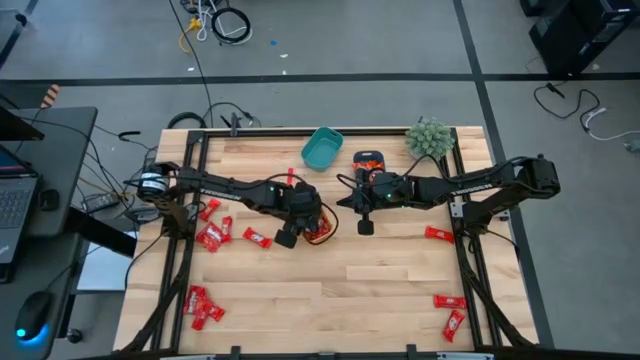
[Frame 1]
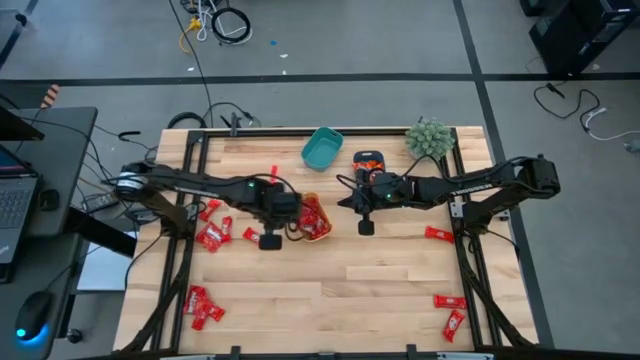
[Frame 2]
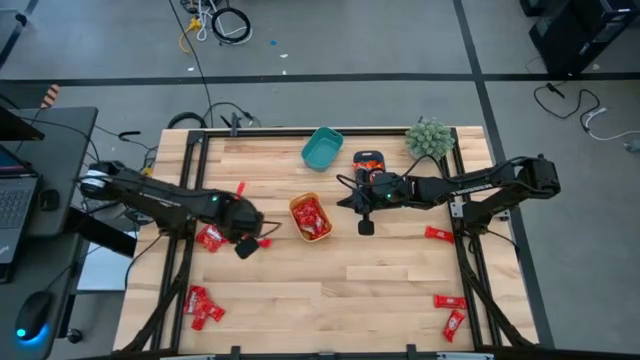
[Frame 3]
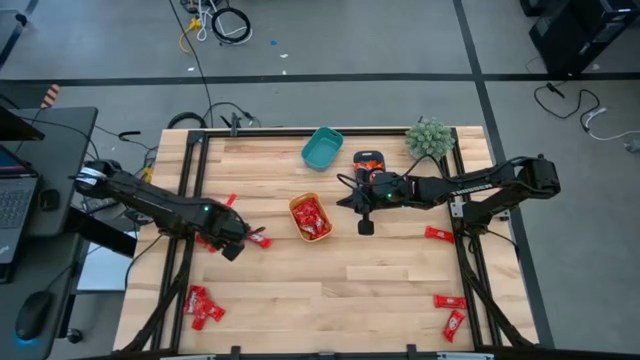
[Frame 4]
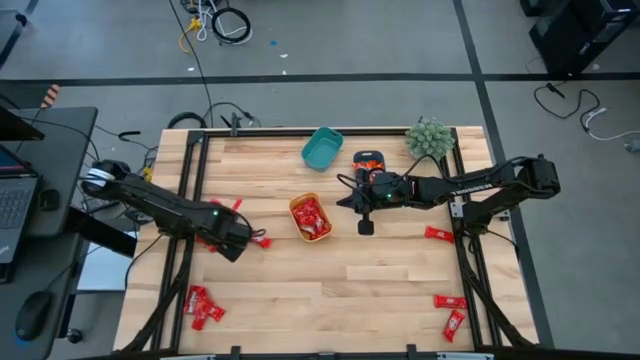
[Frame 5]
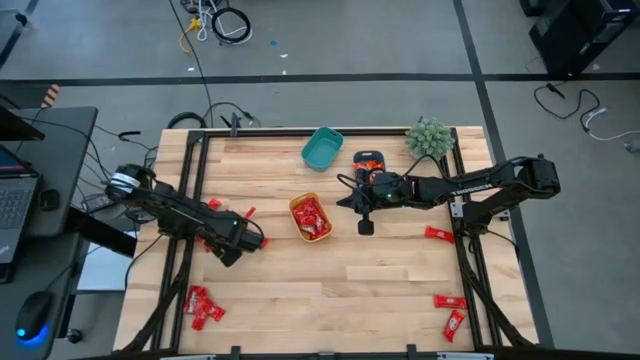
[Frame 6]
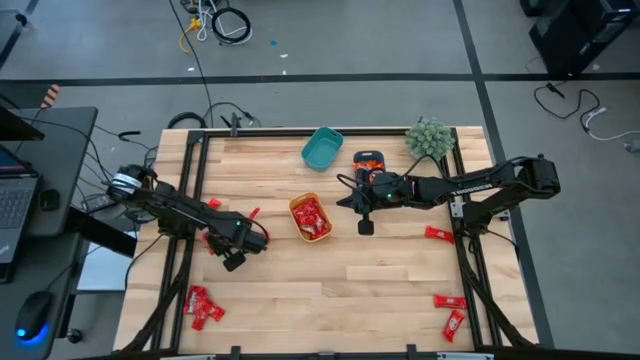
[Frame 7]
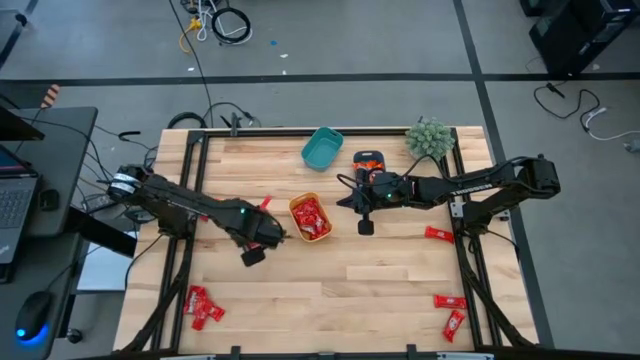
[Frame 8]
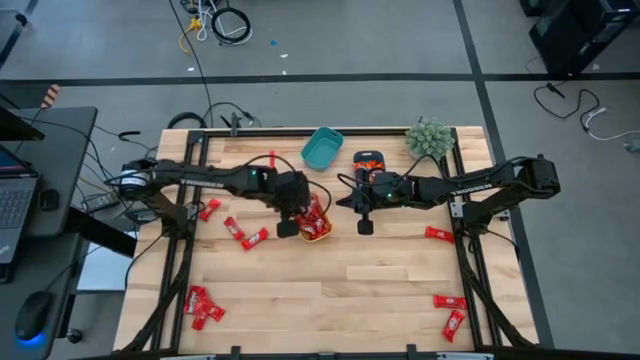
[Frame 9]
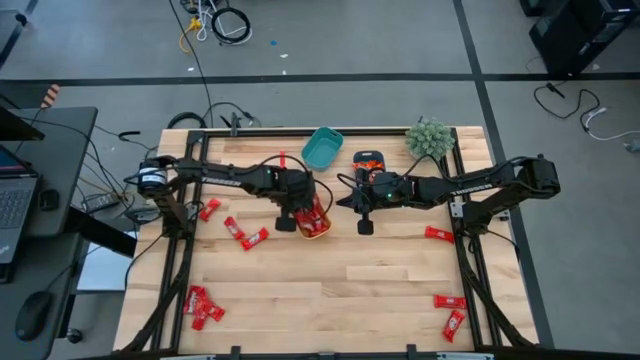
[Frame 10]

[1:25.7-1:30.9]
Task: Sort candy
Put the red candy into the yellow bin

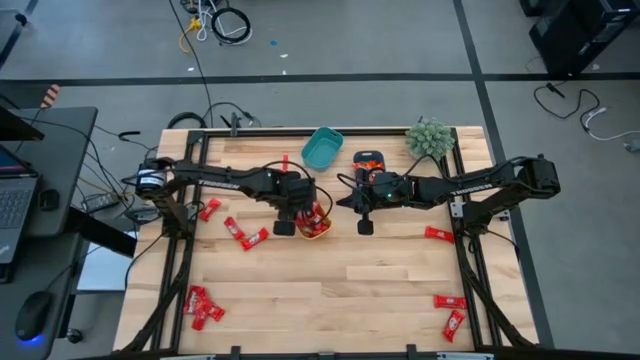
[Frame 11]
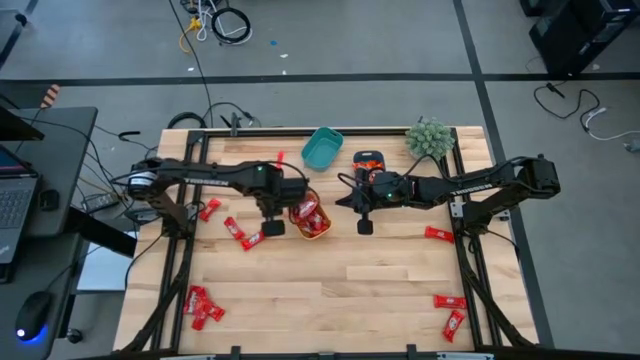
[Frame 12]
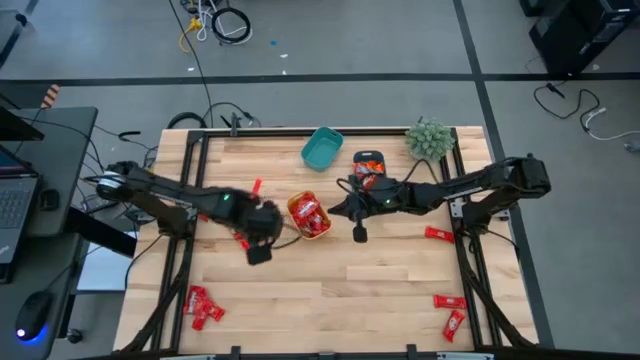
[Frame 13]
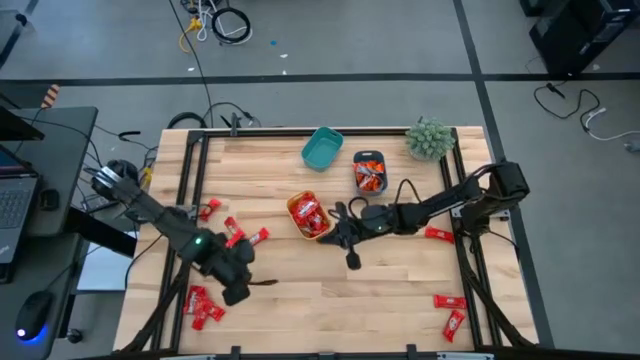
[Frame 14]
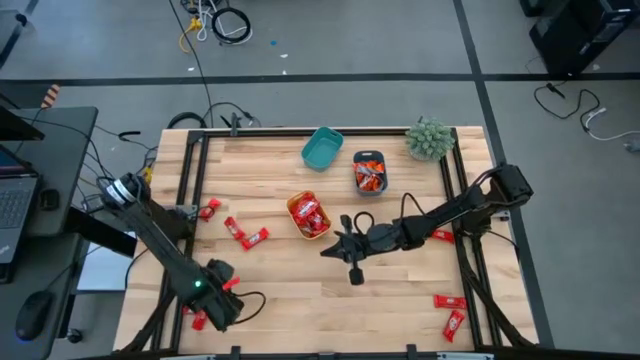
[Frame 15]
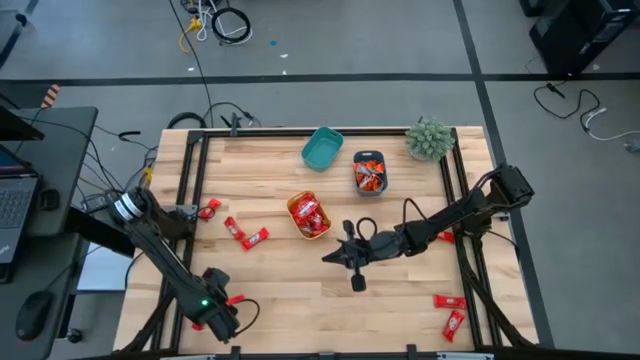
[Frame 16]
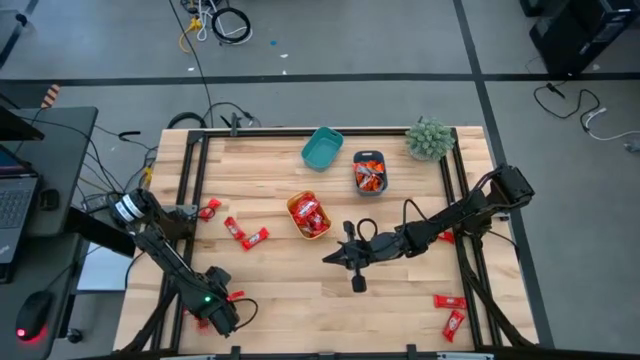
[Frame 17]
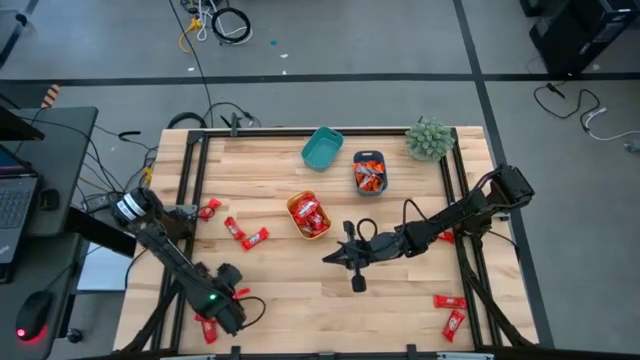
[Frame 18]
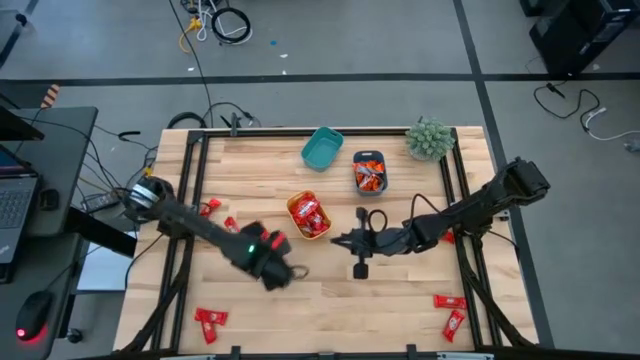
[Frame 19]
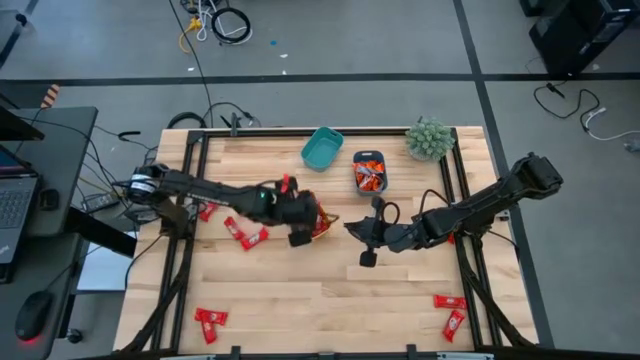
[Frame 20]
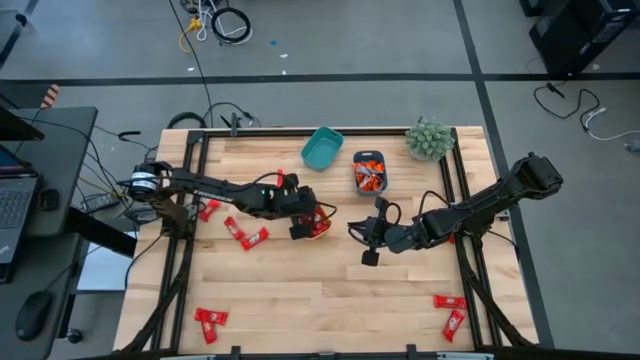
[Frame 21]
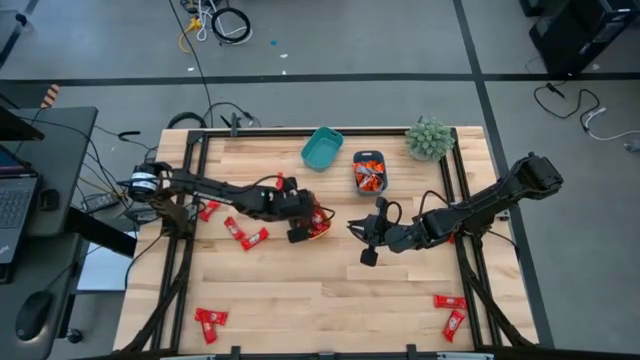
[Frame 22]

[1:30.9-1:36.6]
Put the red candy into the yellow bin

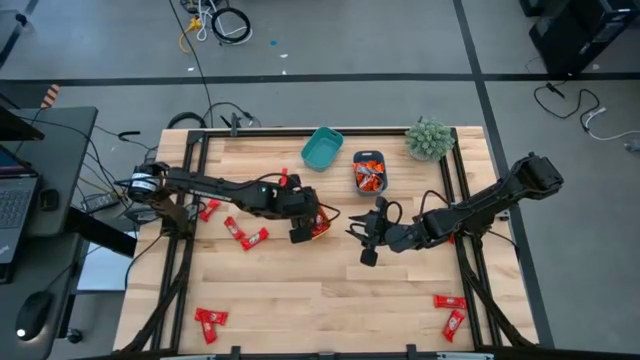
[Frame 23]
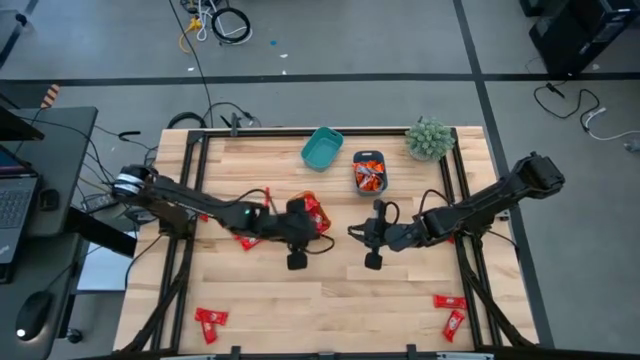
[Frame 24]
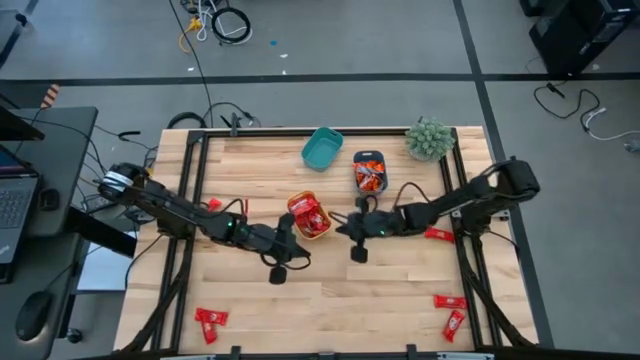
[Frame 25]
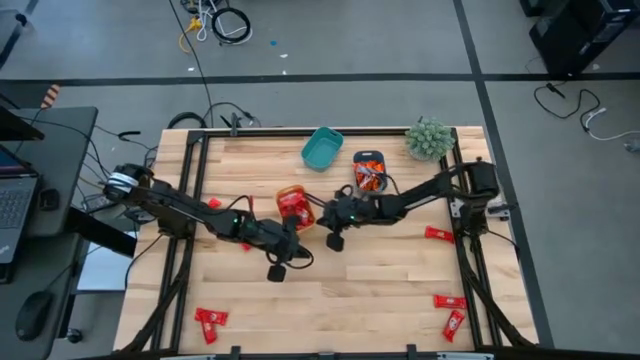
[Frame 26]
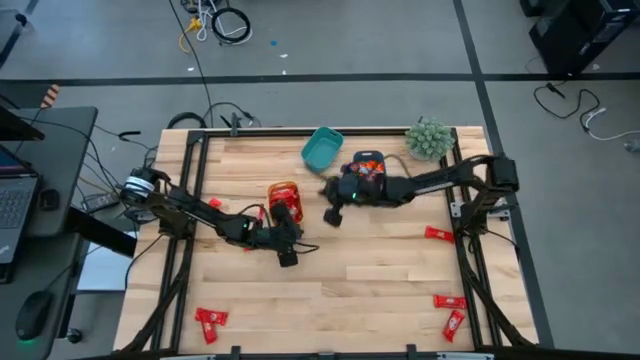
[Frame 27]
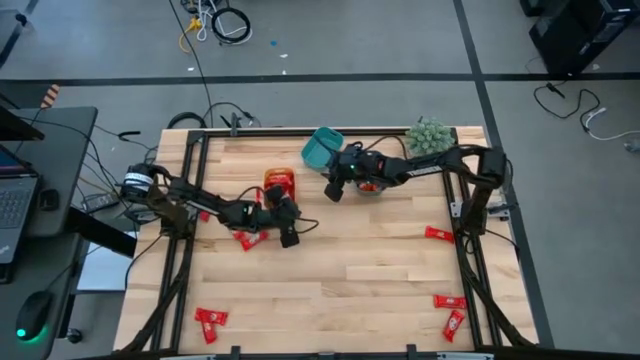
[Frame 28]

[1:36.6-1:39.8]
Move the yellow bin to the top left of the table

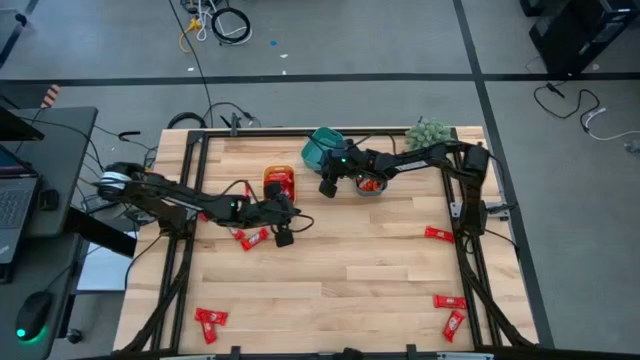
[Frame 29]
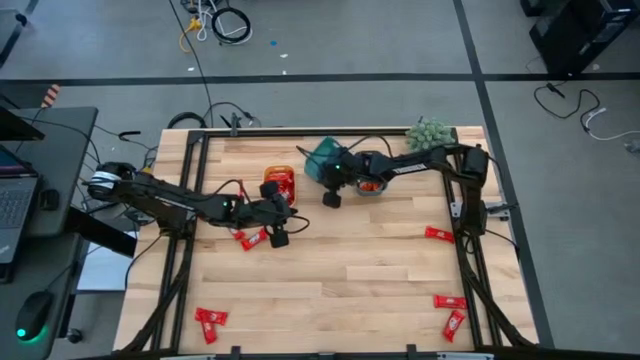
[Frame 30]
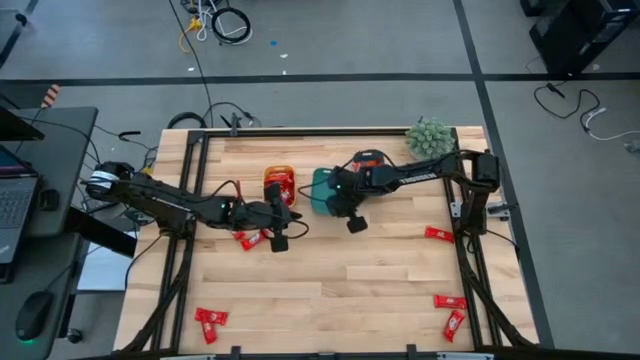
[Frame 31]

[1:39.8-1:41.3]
Move the green bin to the center

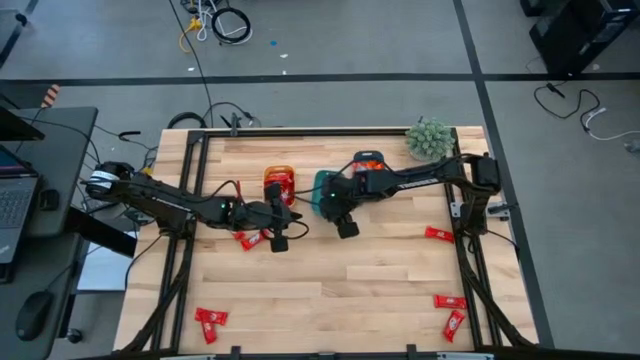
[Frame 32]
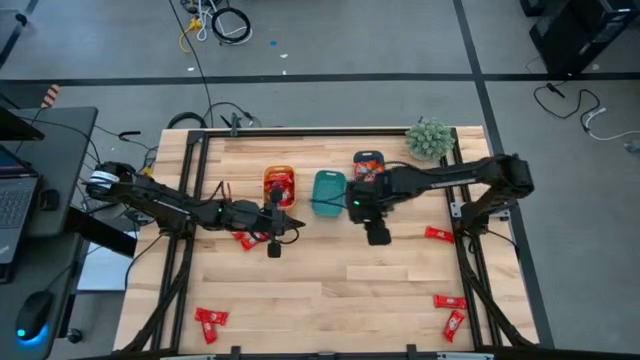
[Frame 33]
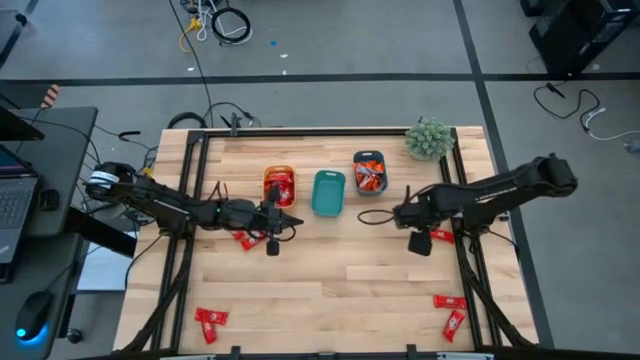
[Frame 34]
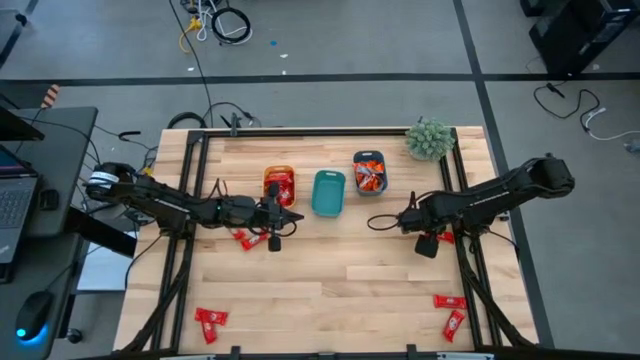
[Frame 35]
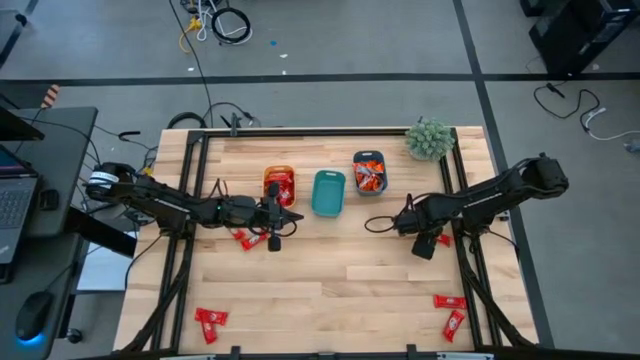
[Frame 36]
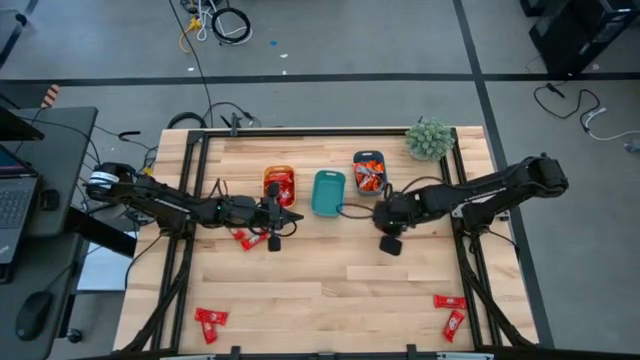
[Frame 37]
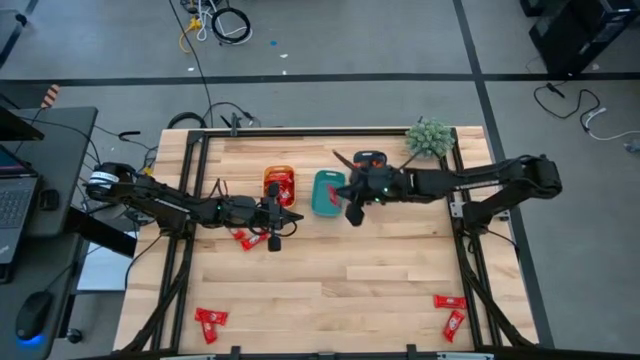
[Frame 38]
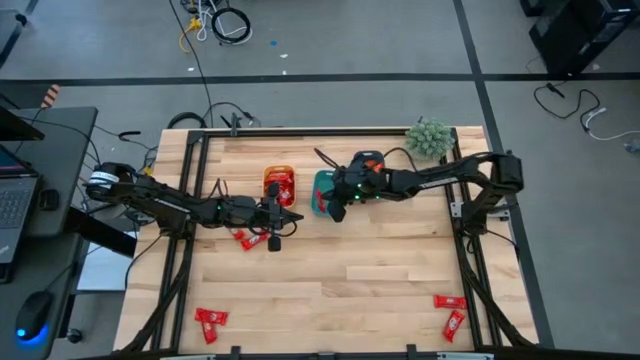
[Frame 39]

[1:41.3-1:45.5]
Put the red chocolate into the green bin

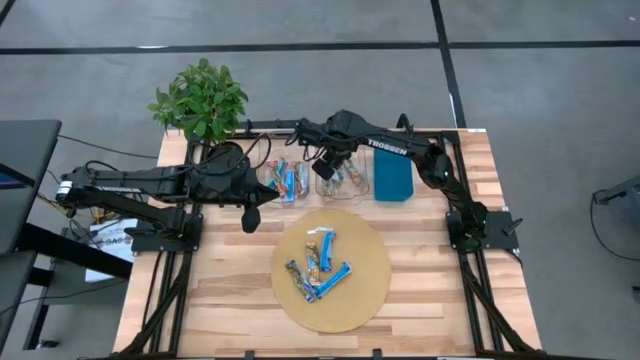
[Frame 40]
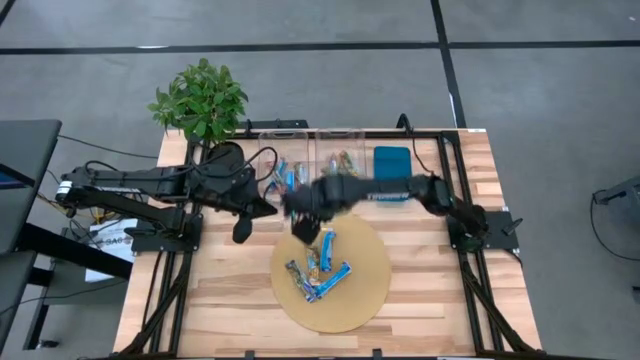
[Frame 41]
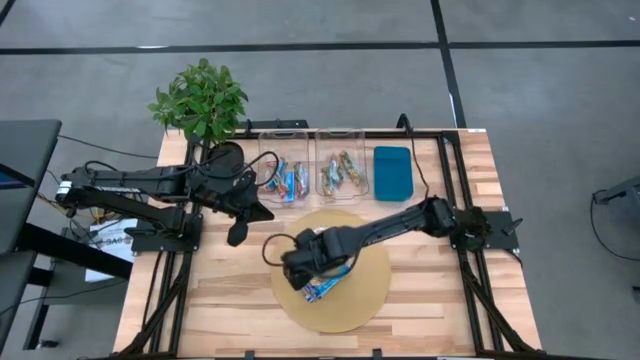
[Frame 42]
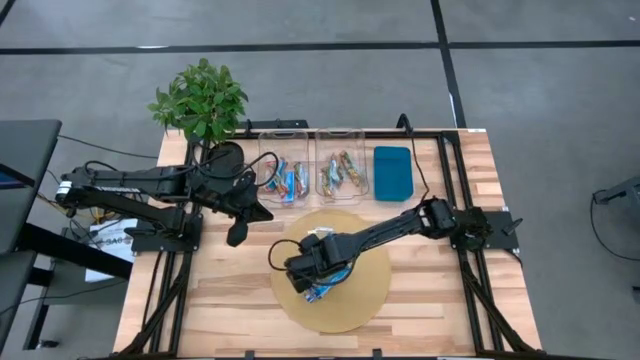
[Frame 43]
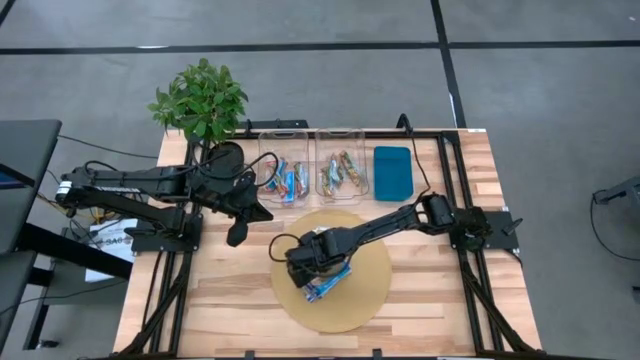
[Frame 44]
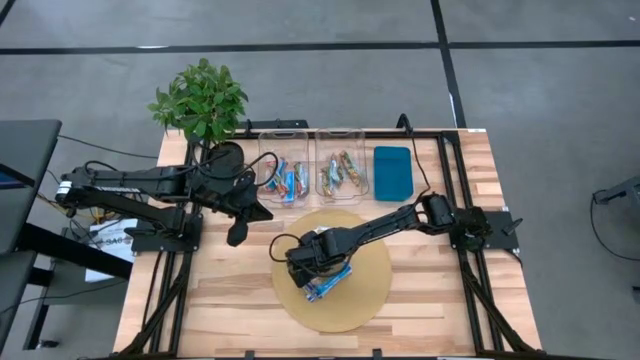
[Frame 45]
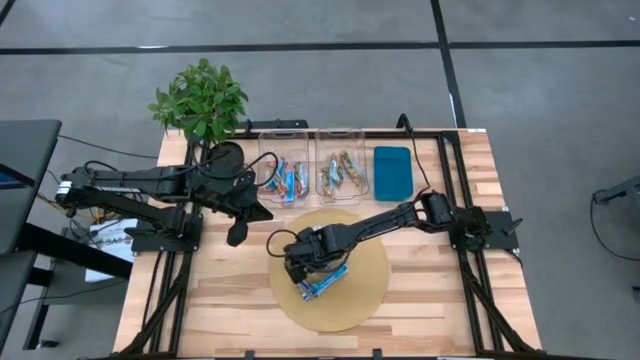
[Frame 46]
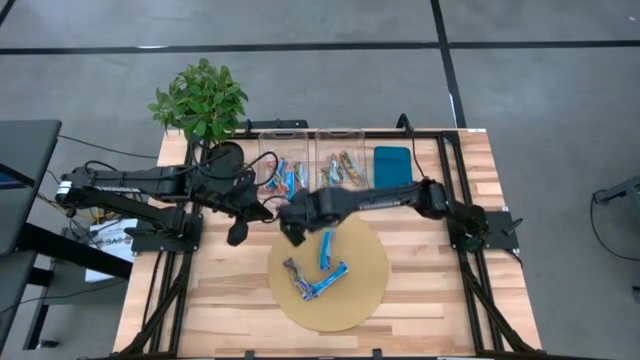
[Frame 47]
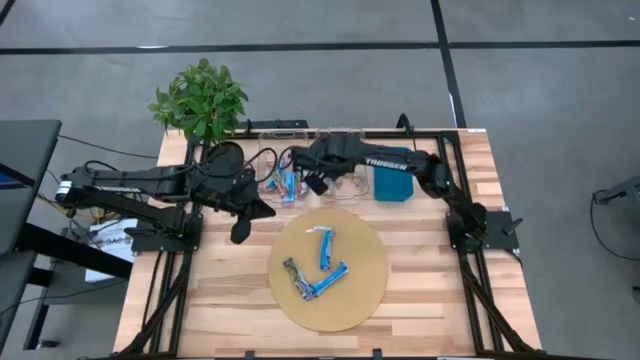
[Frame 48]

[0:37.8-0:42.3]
Task: Pick and place Granola Bars by type
Put the yellow granola bar into the right transparent bin
